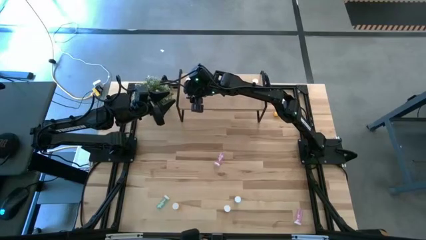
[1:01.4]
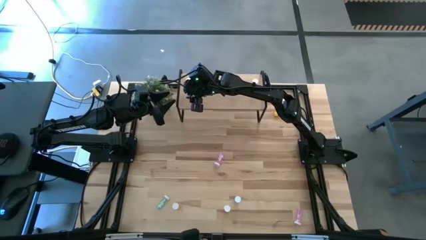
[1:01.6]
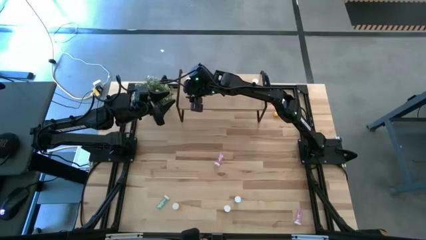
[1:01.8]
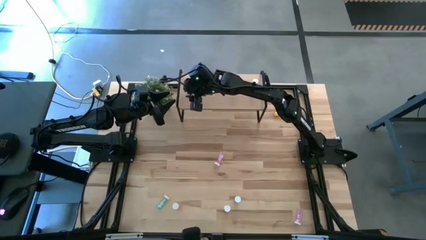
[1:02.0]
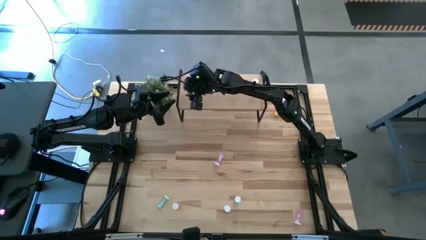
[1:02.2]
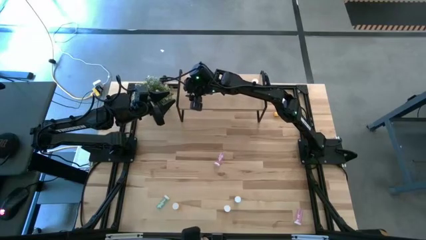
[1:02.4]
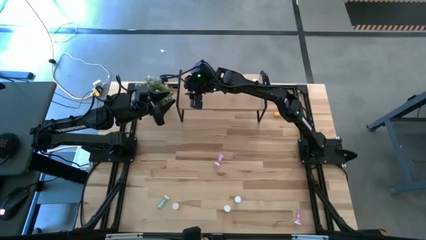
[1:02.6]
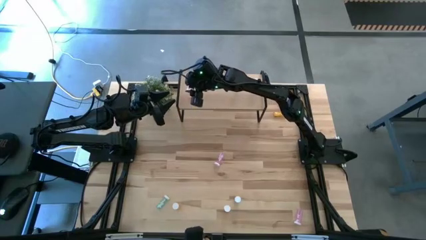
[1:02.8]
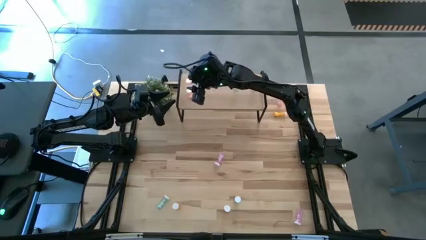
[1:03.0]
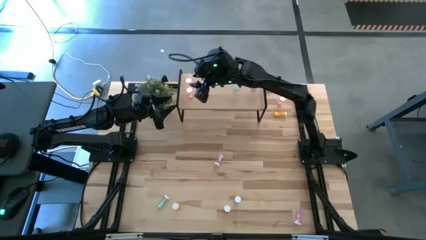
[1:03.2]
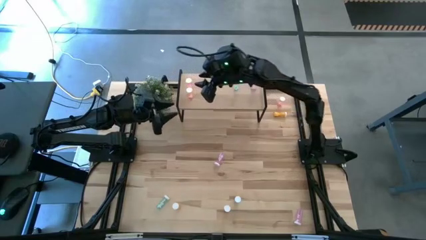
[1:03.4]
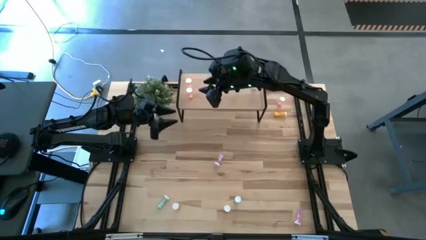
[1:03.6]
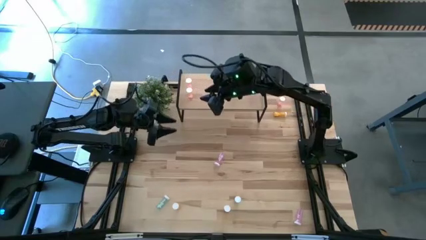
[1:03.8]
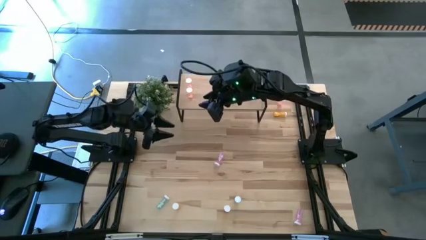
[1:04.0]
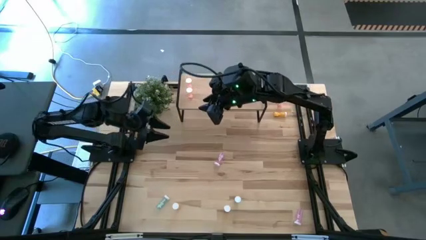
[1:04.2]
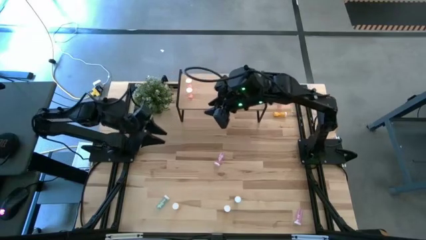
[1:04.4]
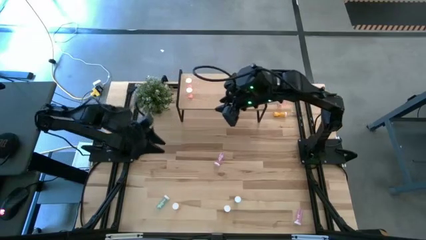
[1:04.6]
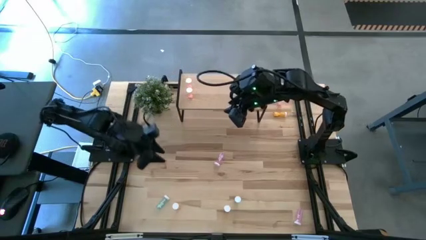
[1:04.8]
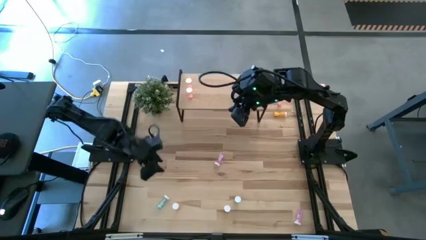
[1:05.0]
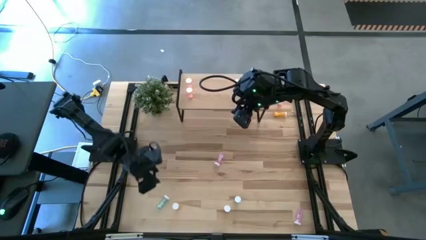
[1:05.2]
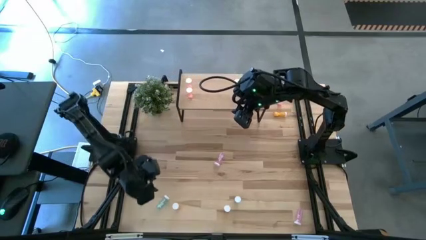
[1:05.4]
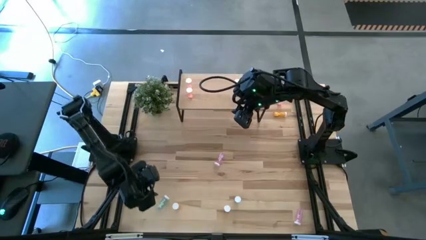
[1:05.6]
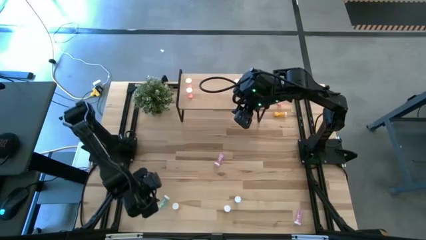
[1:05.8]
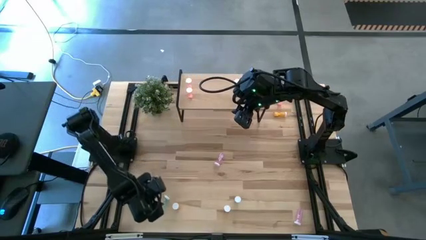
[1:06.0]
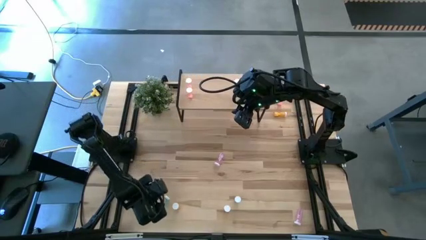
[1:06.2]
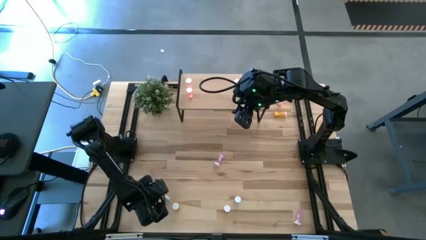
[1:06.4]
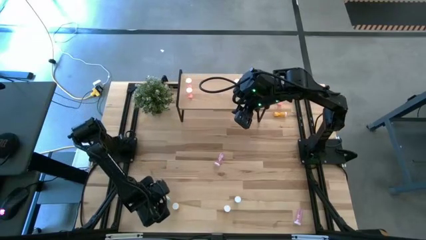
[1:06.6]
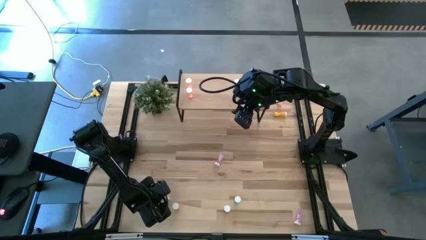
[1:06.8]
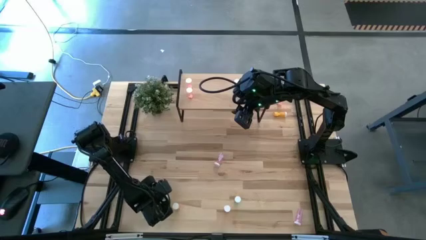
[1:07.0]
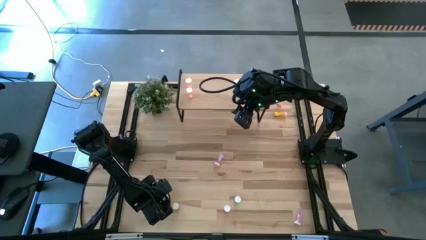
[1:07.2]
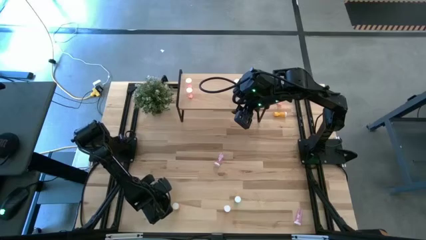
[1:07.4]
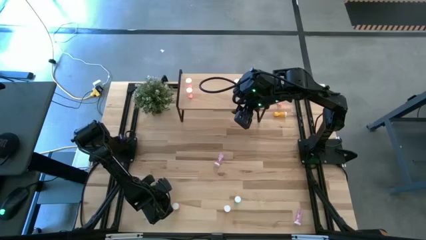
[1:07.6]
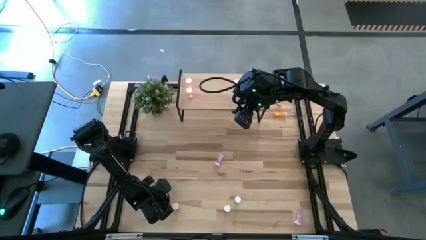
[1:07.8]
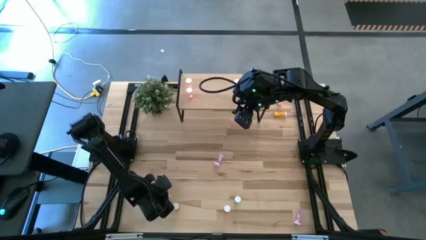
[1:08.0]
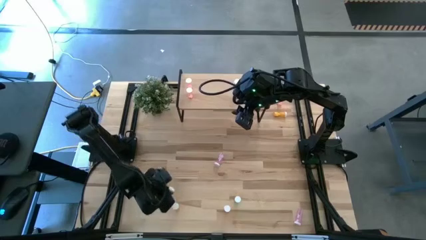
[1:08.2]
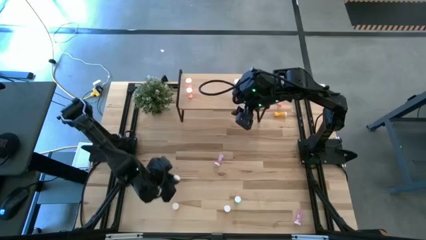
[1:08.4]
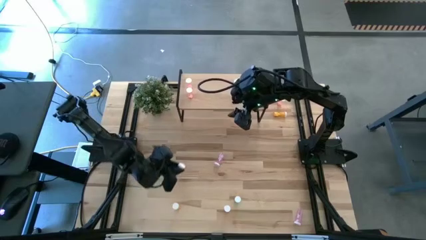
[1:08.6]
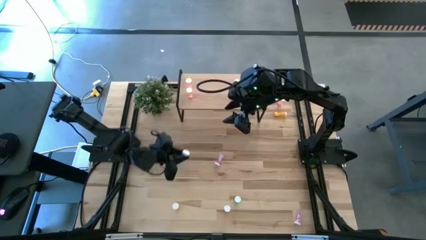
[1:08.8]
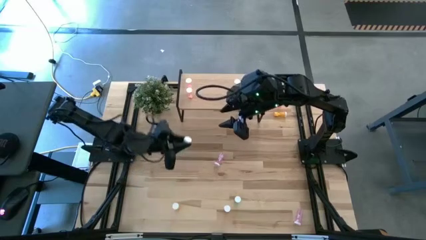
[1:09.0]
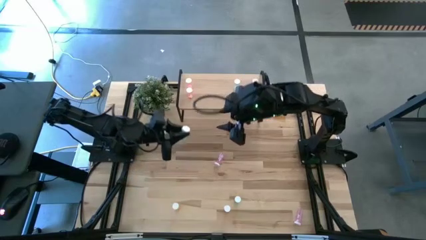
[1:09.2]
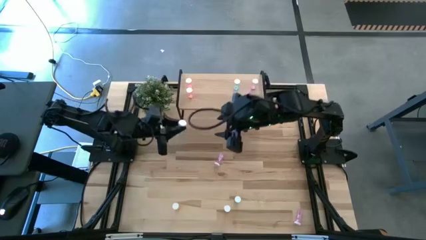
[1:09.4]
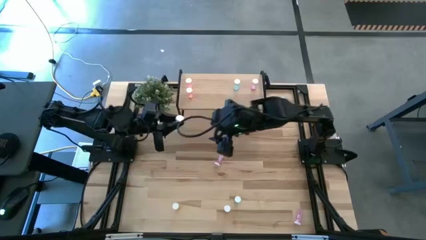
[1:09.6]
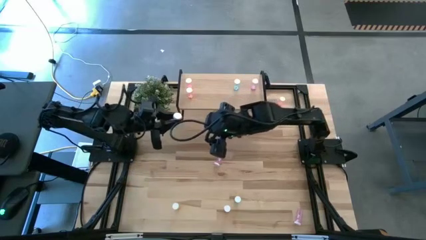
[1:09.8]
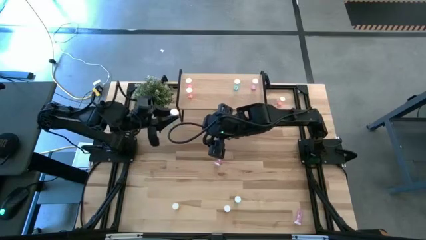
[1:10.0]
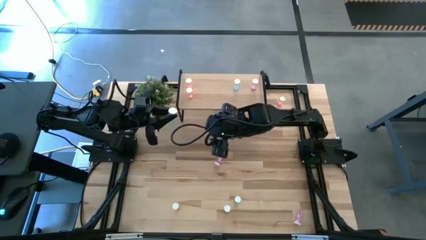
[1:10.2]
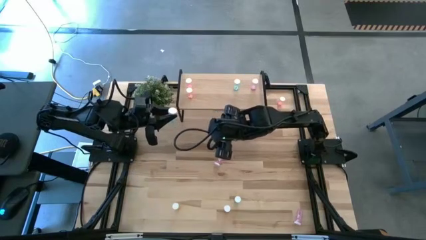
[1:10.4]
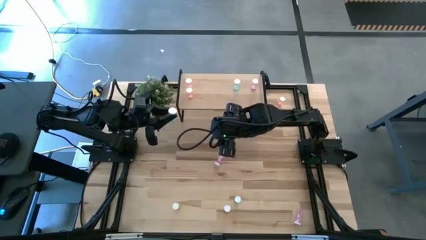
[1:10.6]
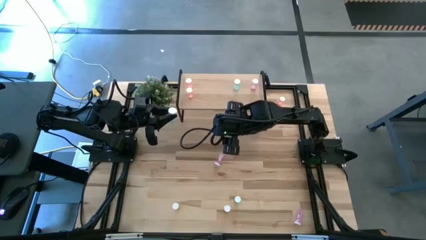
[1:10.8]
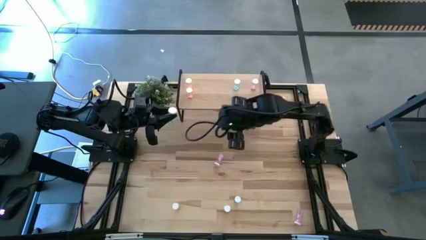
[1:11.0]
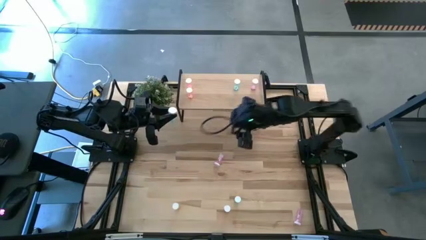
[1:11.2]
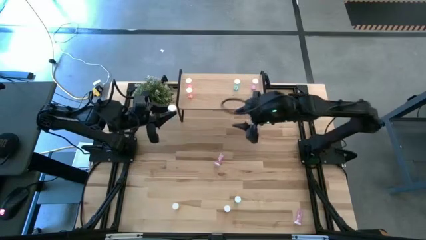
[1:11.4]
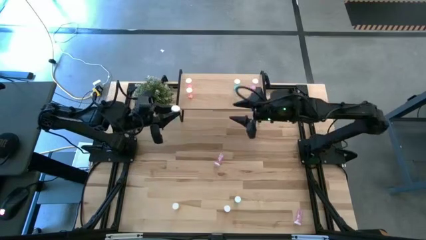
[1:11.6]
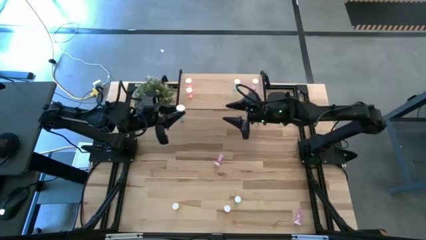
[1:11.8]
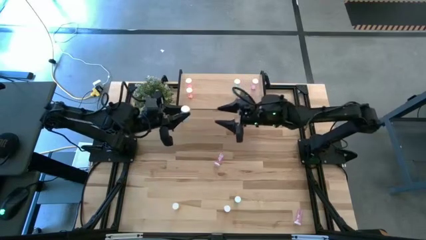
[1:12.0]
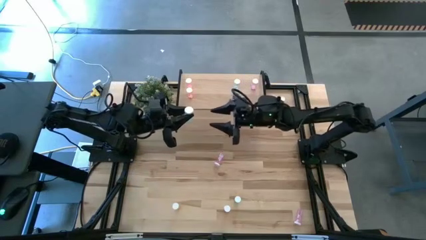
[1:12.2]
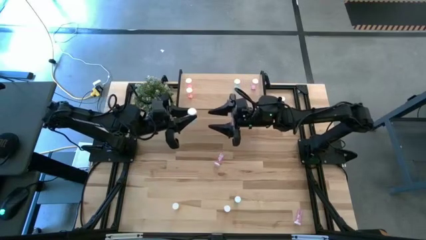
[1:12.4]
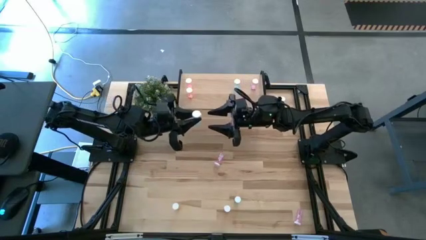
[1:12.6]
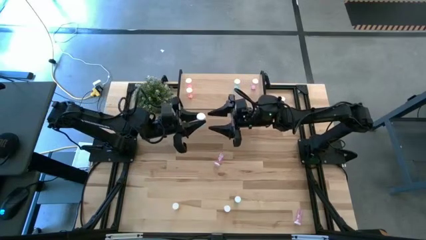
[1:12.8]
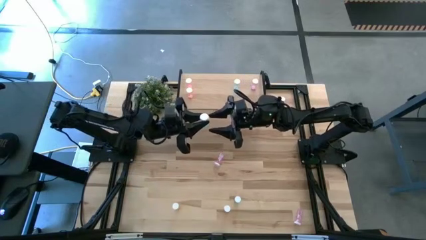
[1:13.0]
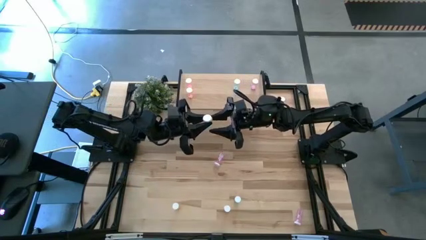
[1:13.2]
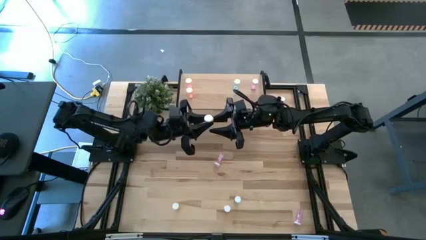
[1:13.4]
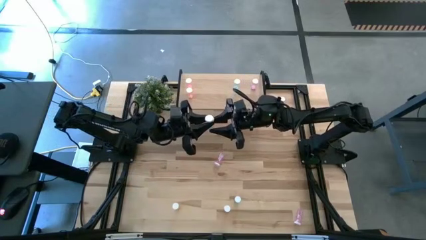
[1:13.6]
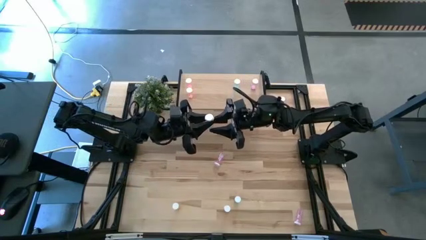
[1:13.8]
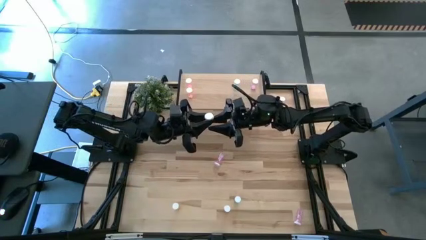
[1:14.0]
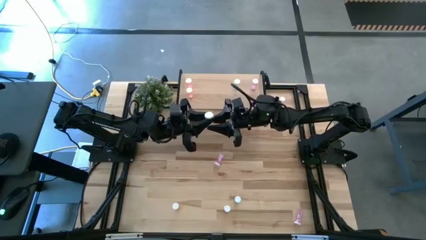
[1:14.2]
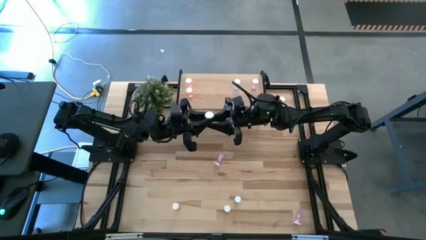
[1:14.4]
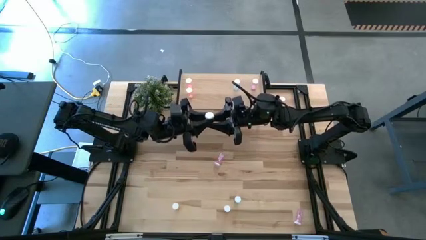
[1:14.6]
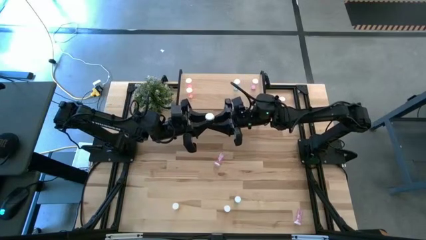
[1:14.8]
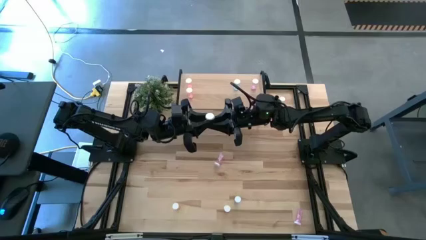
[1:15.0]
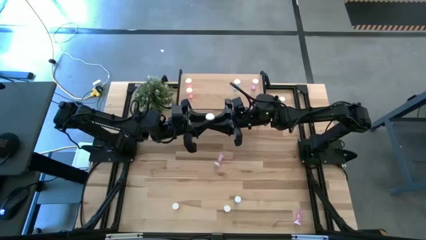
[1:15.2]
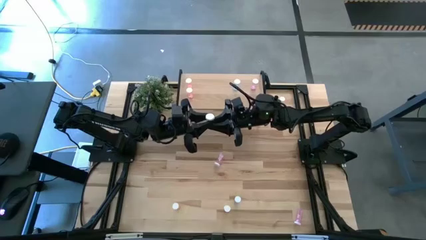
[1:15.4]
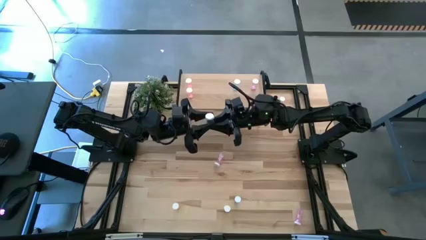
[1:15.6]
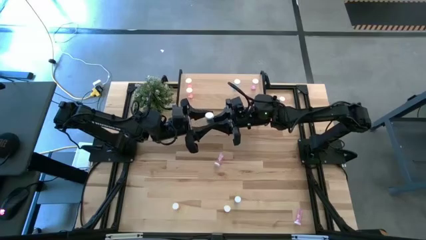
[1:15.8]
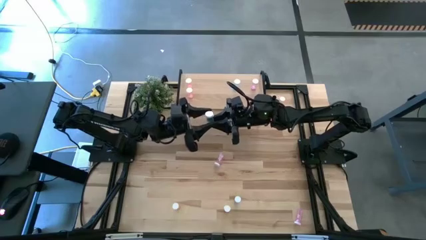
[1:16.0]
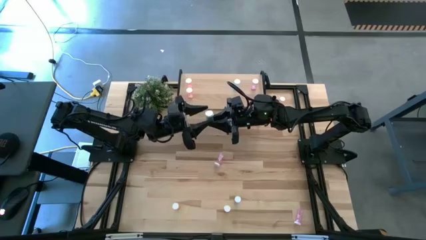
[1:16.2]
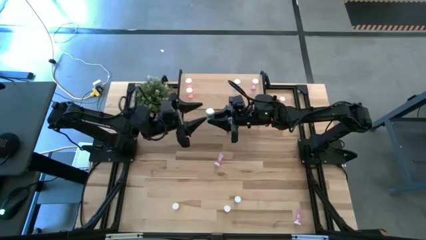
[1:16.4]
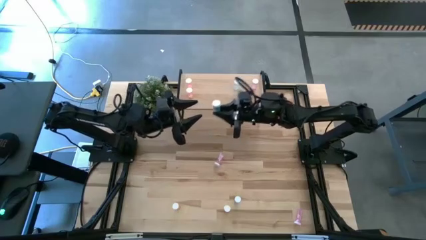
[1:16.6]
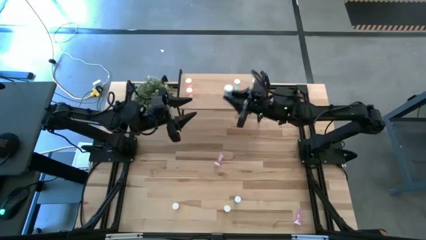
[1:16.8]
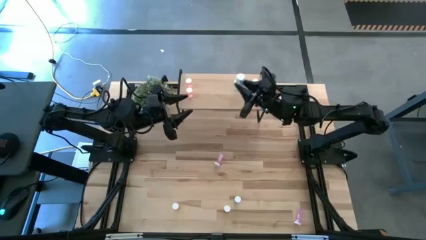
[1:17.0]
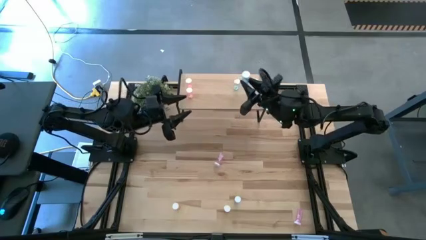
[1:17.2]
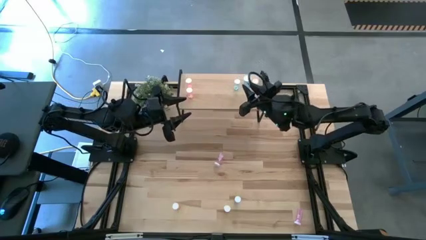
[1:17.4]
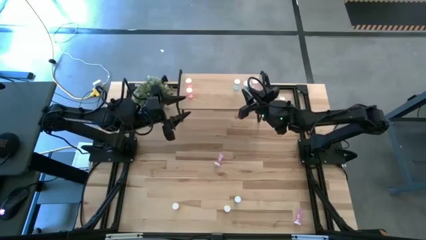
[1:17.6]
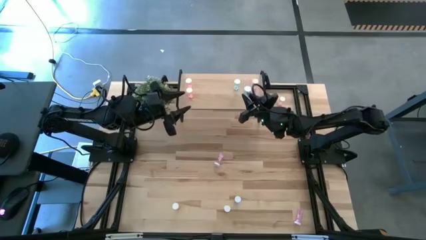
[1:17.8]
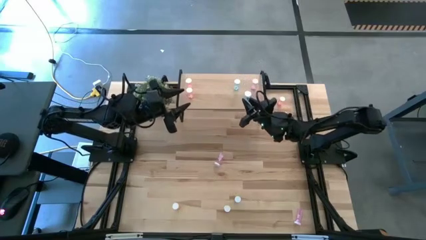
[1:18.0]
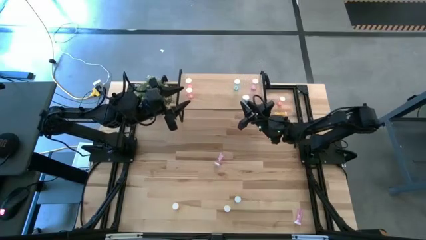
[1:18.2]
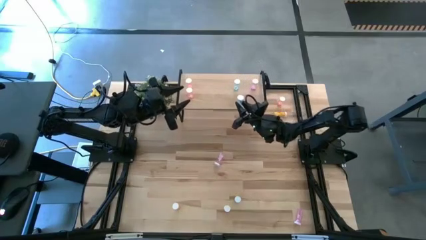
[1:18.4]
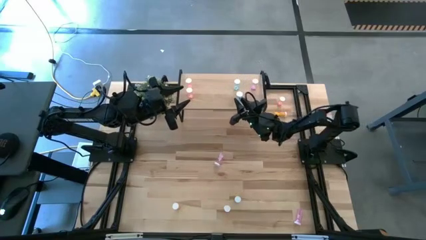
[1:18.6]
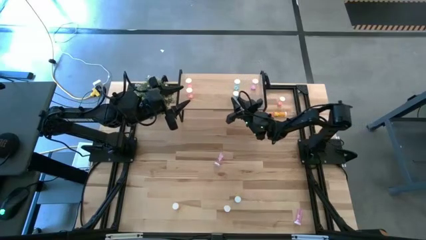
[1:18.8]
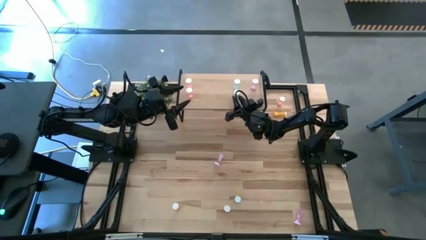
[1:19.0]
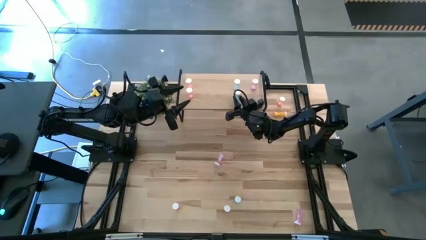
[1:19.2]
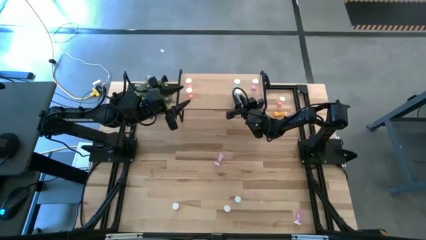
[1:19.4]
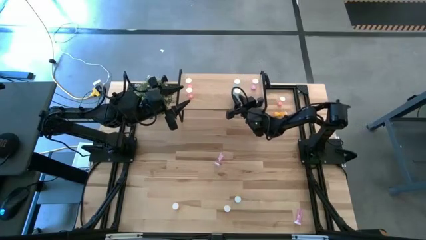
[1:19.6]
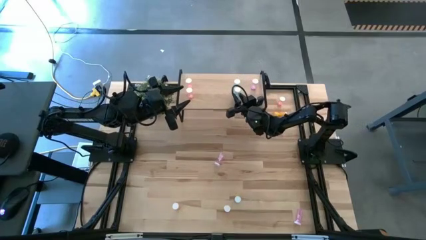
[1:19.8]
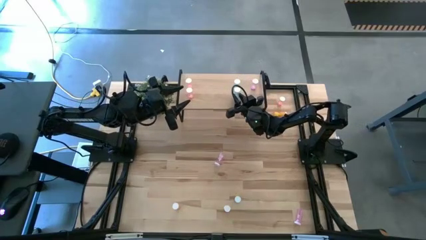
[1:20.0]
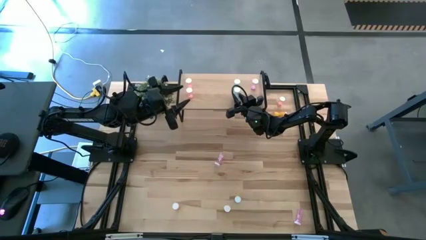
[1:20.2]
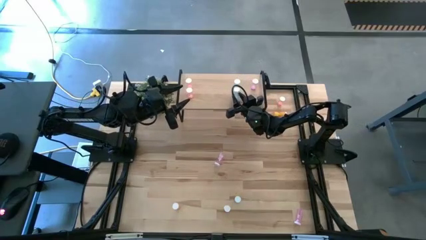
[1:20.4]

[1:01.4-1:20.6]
Task: Pick and place medicine bottles onto shelf by color
Put the left blue pill bottle on the shelf aligned with the other blue pill bottle
